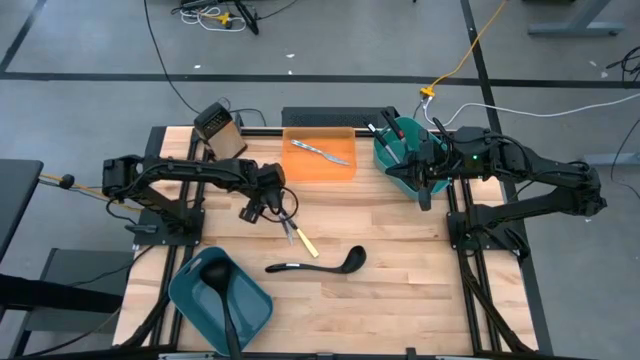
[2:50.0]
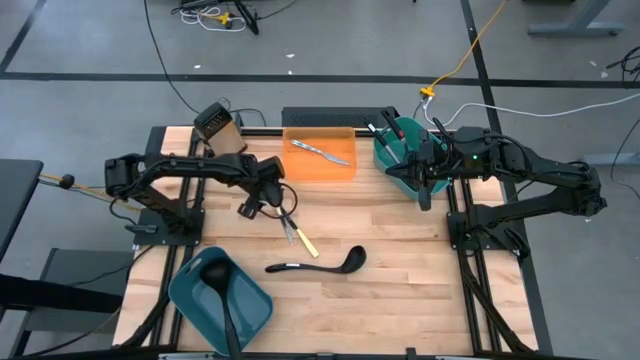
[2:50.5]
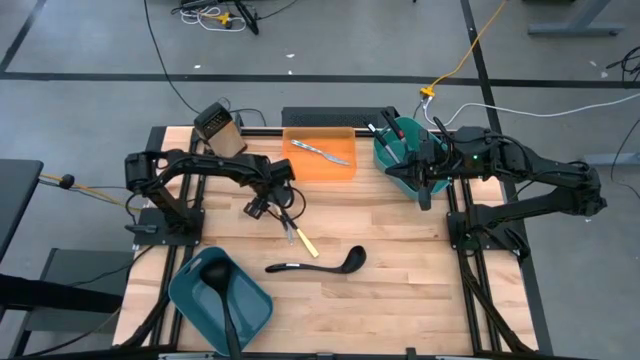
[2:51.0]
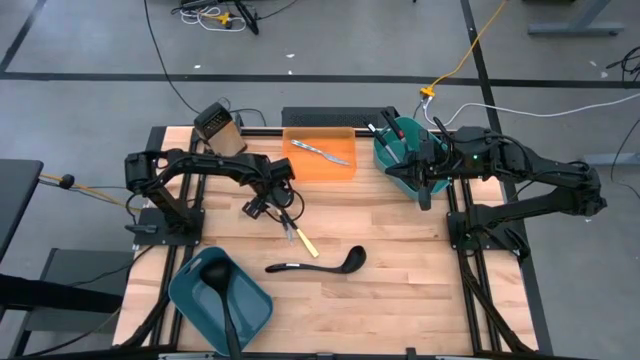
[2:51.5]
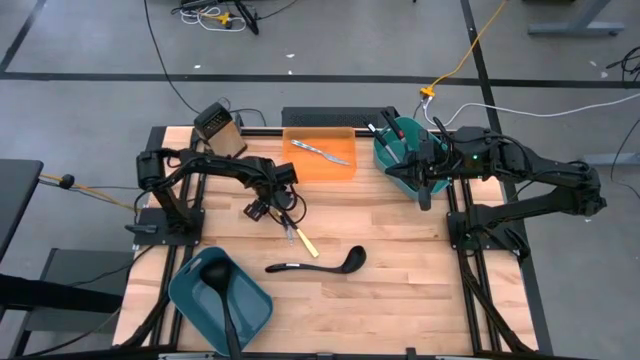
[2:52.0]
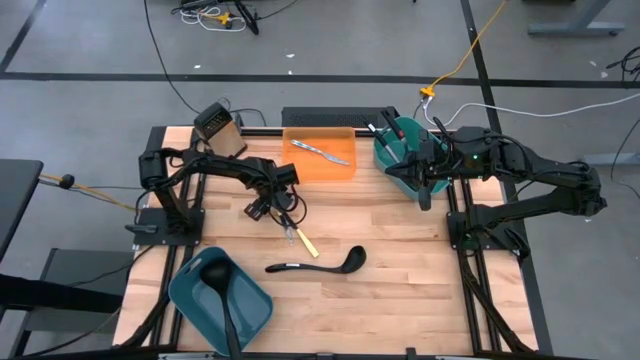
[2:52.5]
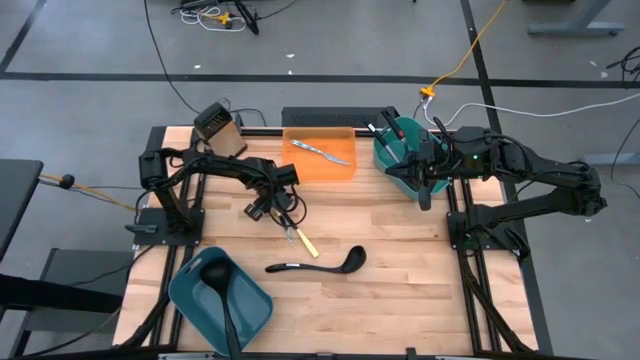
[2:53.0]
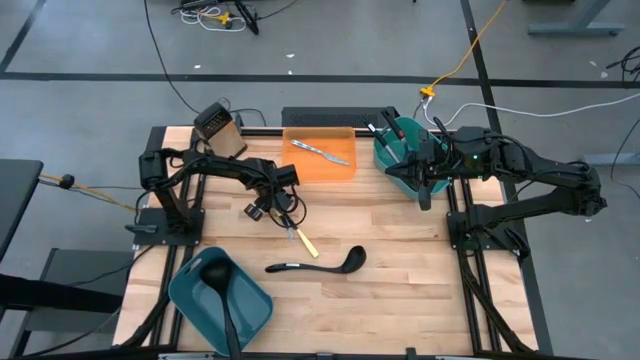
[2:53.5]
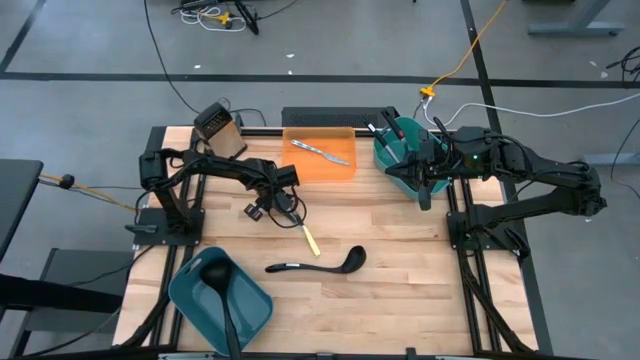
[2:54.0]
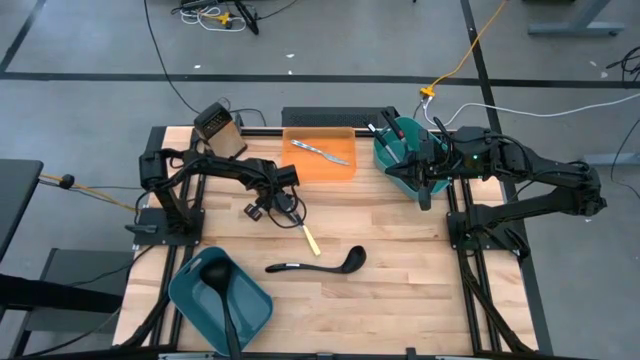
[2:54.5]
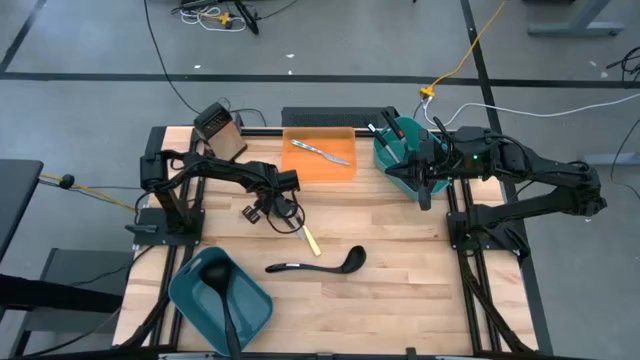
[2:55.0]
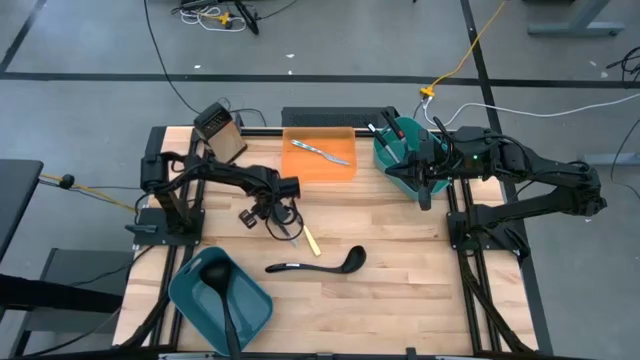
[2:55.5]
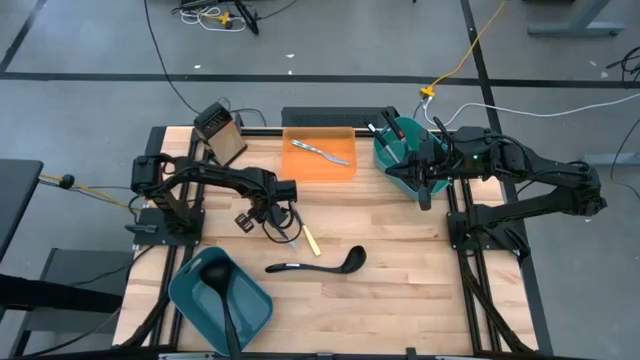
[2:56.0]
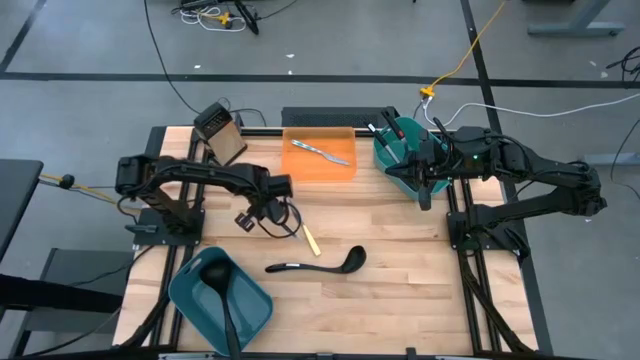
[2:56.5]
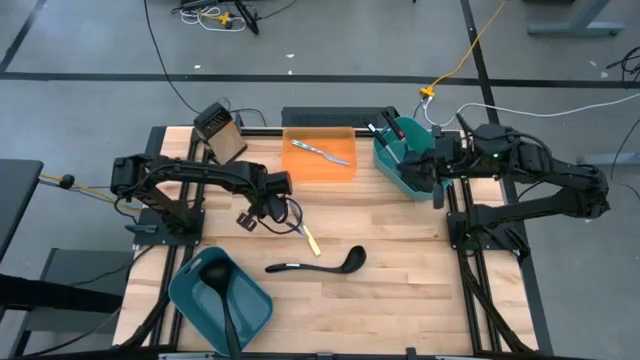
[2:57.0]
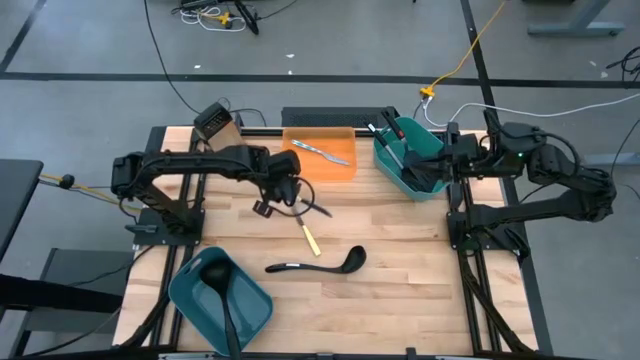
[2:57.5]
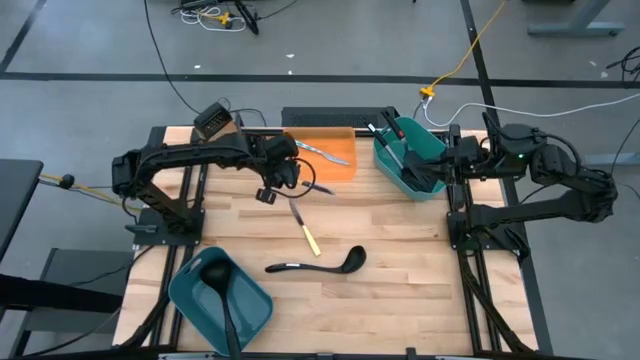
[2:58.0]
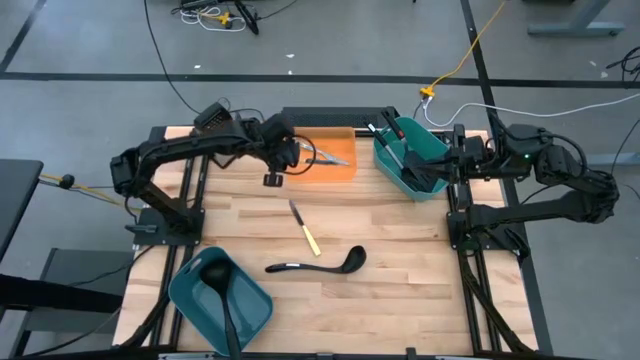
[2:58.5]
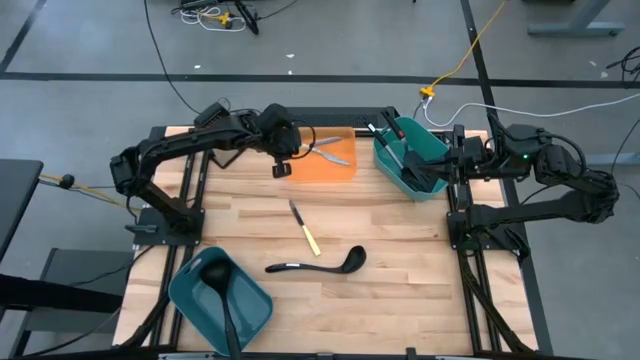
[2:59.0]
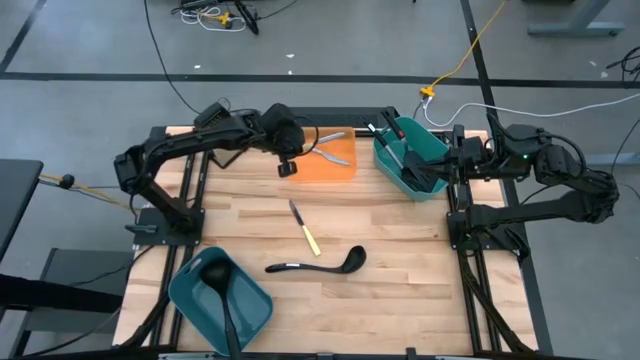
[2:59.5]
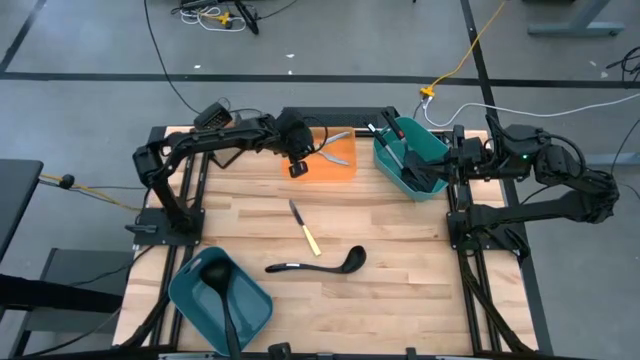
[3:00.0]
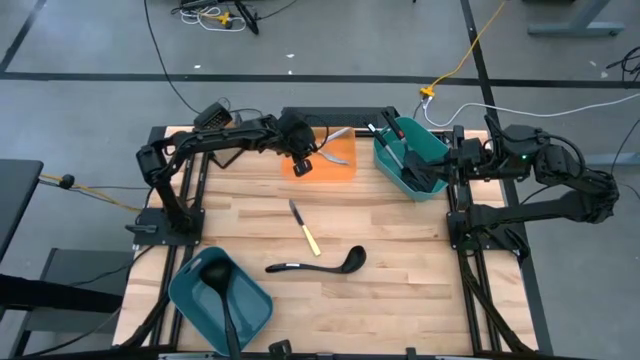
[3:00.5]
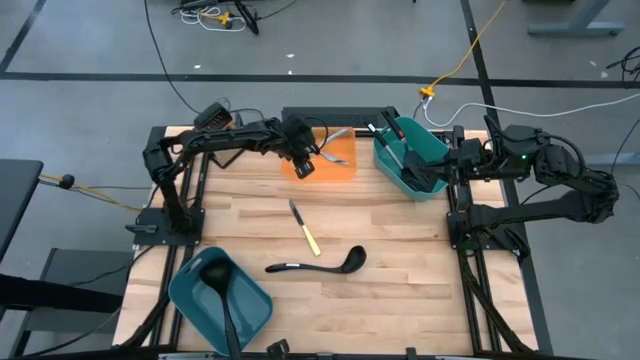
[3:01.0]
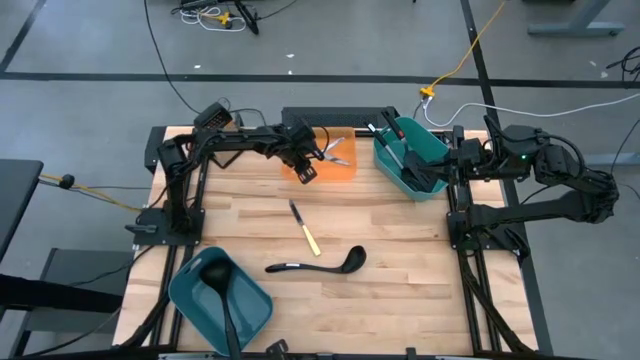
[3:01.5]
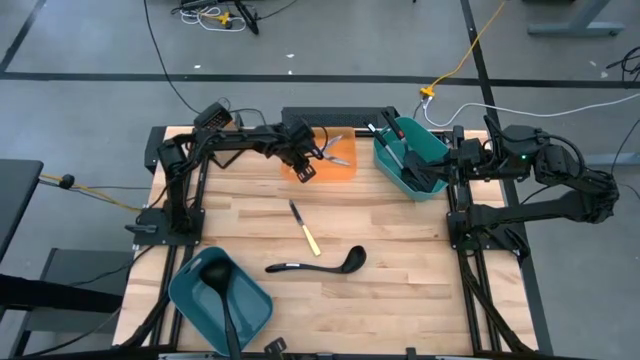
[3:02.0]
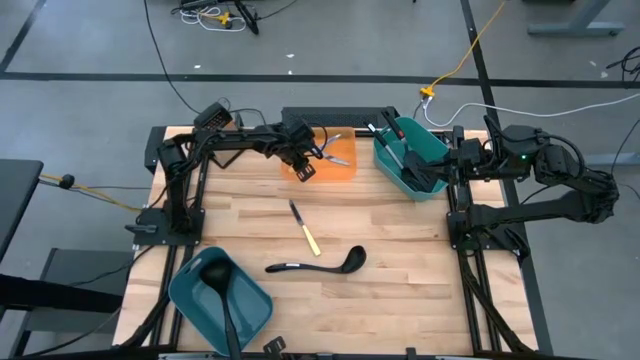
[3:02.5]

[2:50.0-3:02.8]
Task: Pick & Place Kitchen Items
Put the left yellow knife into the orange bin

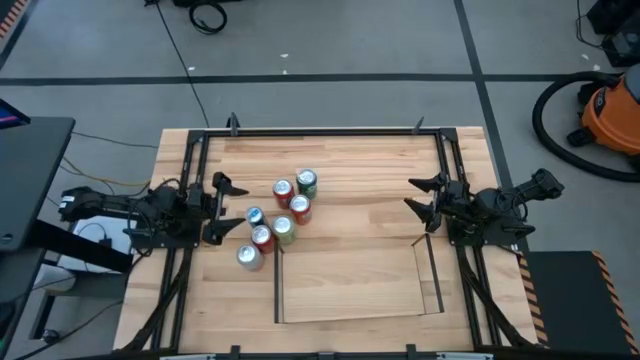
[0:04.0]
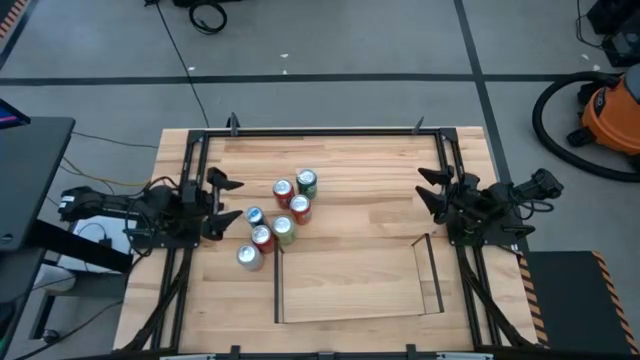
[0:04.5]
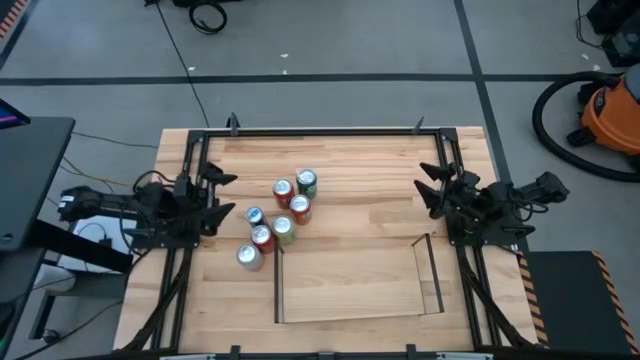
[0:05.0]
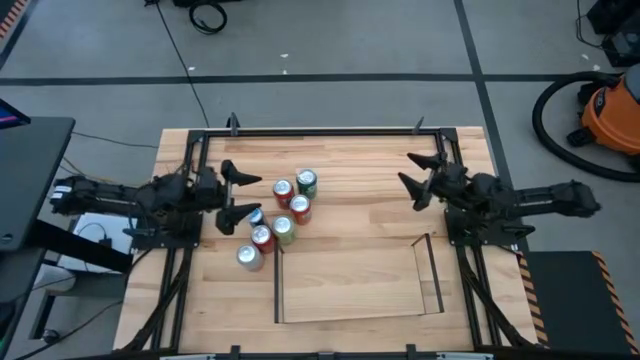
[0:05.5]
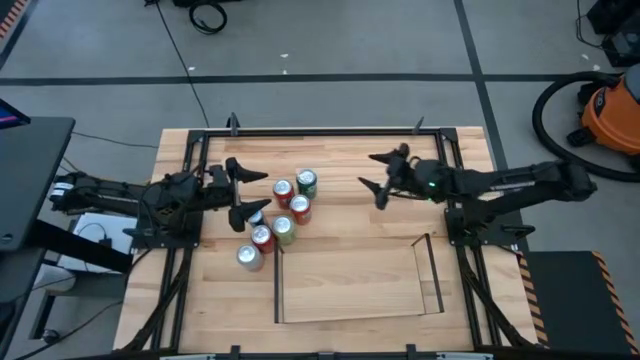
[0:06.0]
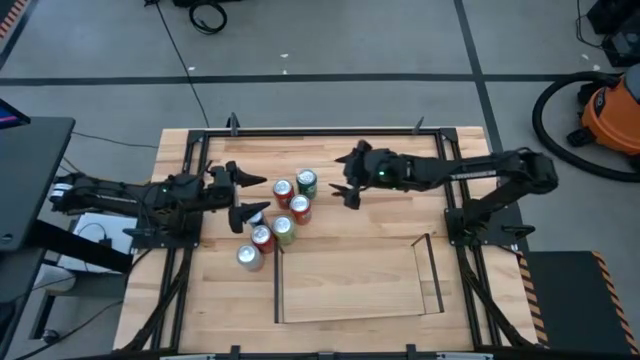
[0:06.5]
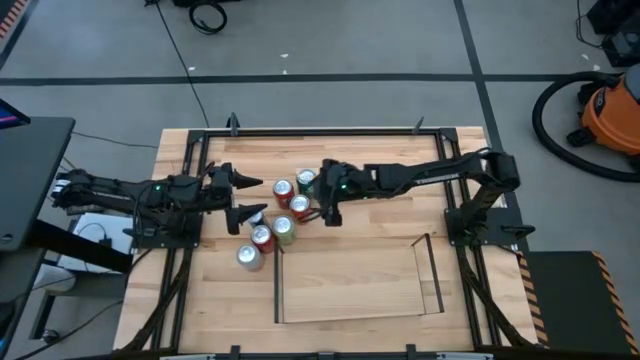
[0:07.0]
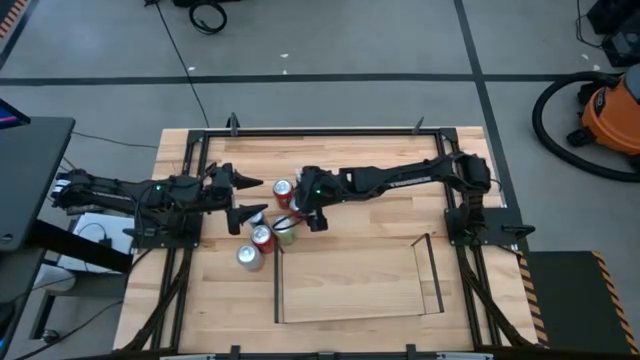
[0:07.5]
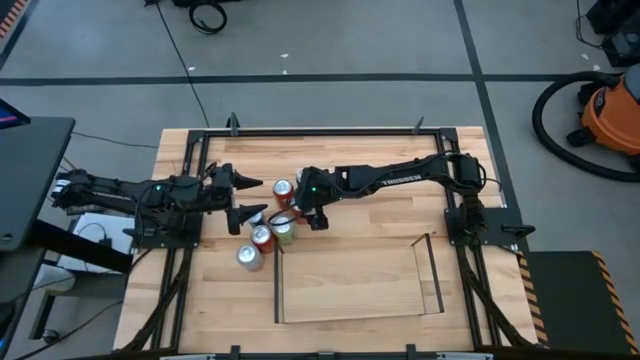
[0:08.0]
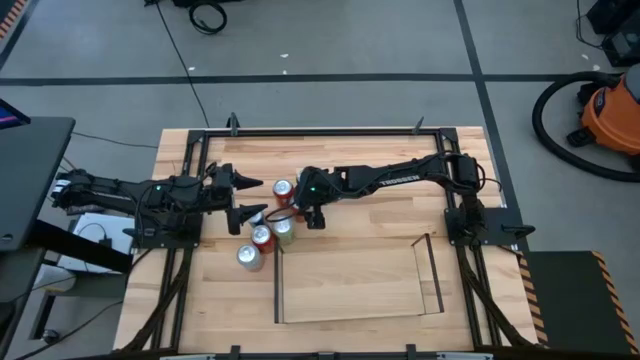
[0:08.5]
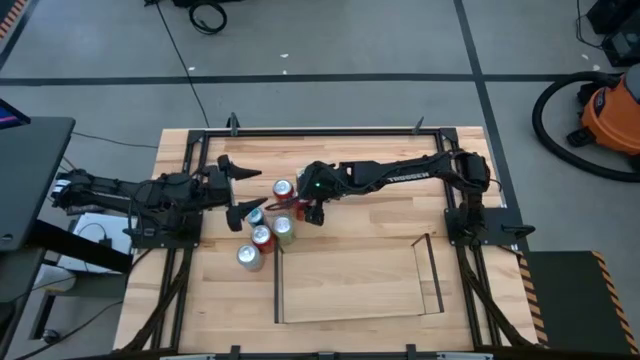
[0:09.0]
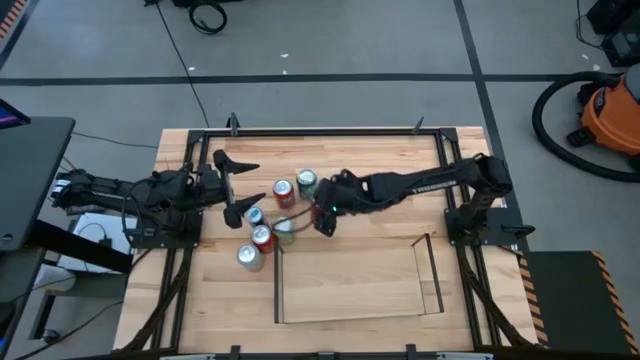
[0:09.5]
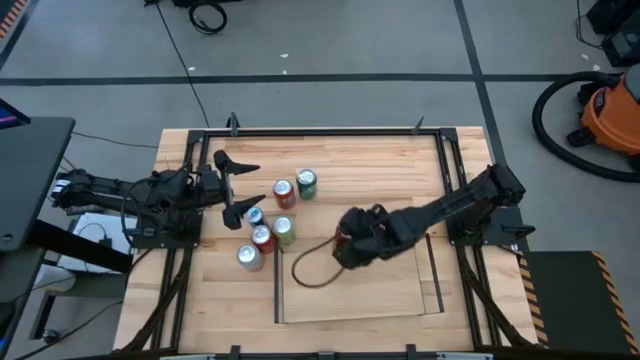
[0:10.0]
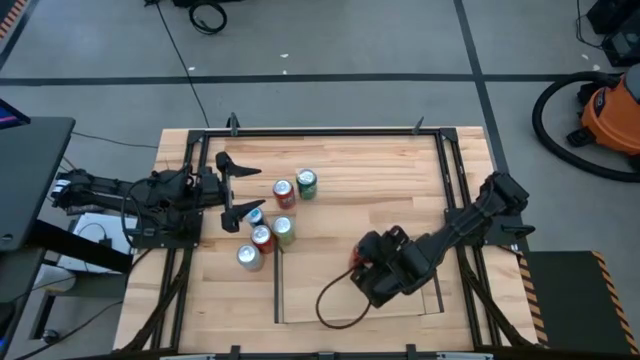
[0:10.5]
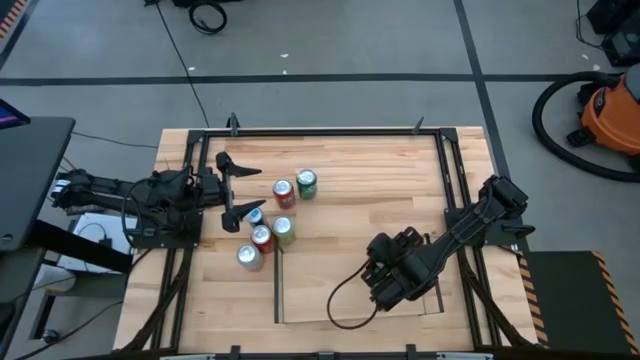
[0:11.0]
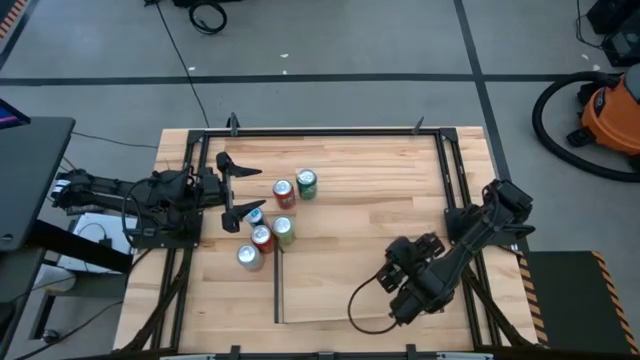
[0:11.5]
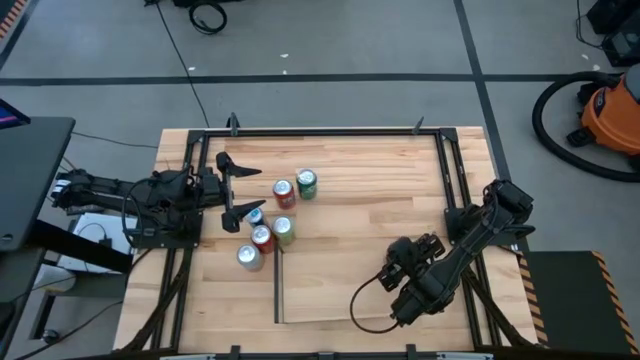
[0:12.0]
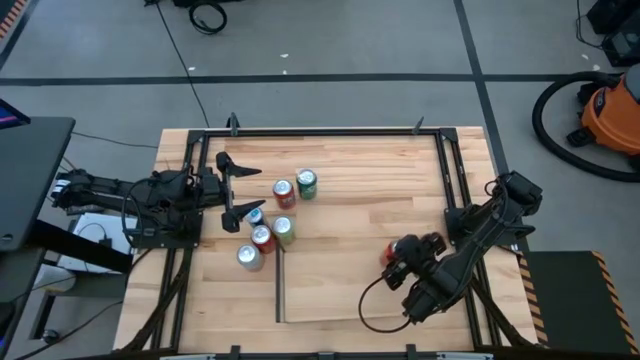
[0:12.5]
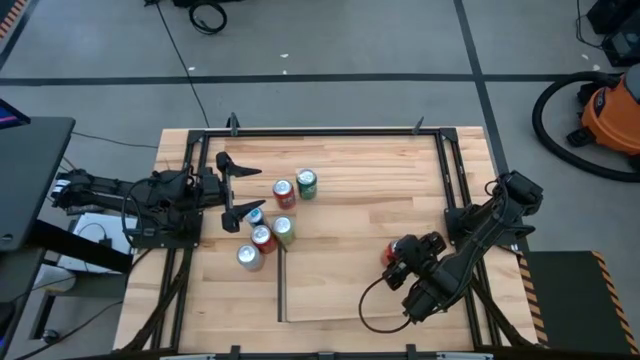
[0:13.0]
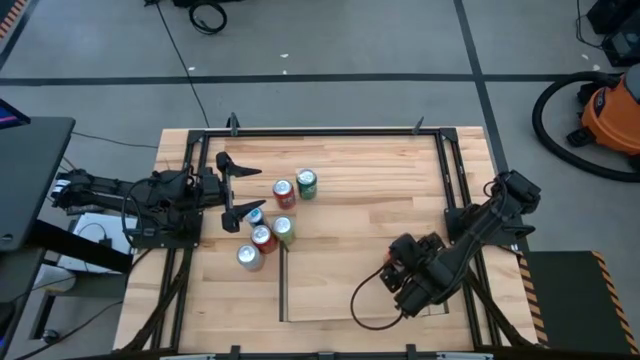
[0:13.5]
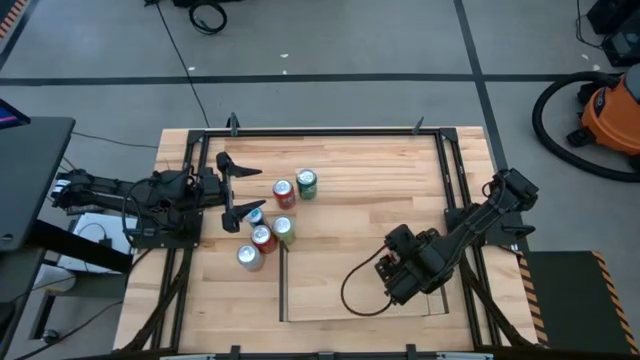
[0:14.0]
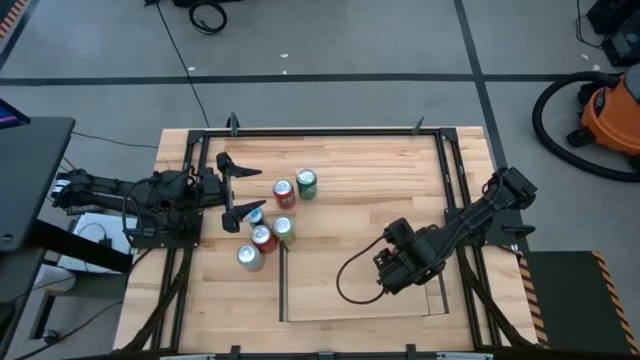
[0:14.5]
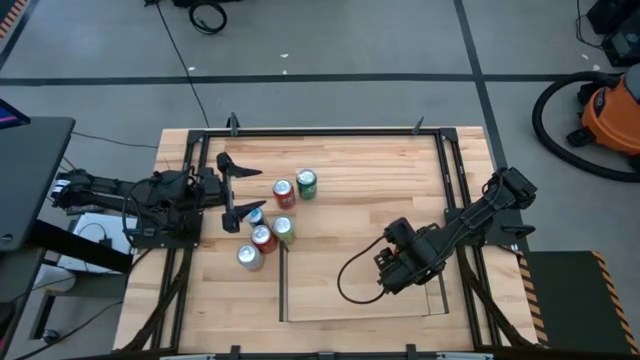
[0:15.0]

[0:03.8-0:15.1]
Task: Place canned beverage on shelf
Put the bottom red soda can on the shelf
